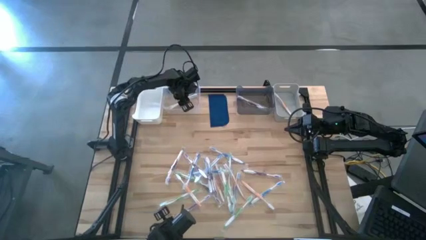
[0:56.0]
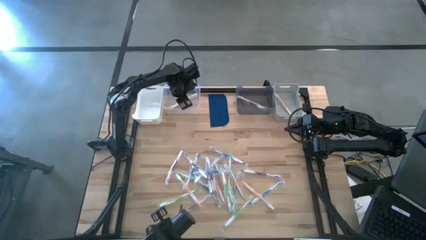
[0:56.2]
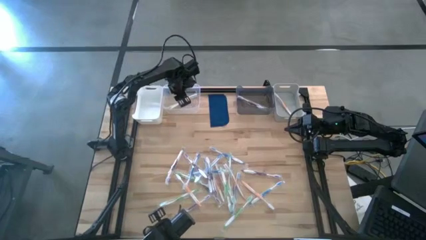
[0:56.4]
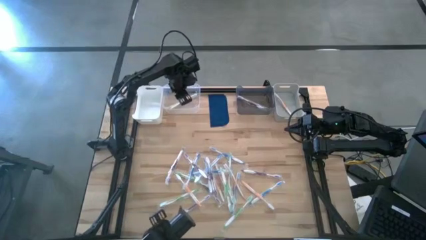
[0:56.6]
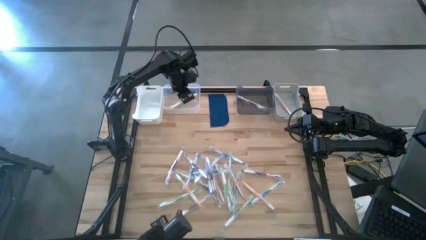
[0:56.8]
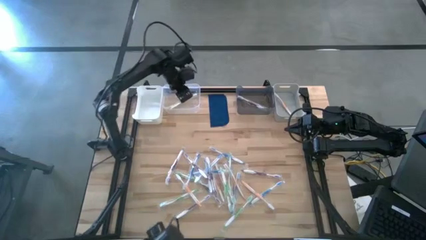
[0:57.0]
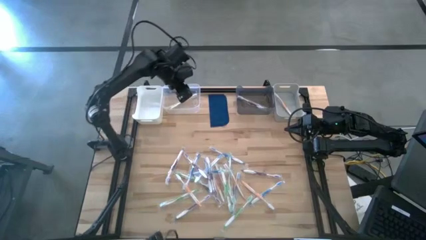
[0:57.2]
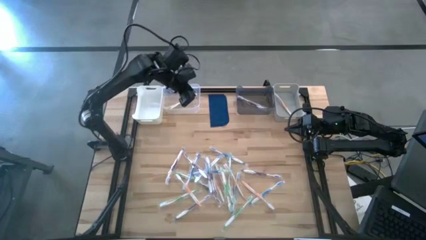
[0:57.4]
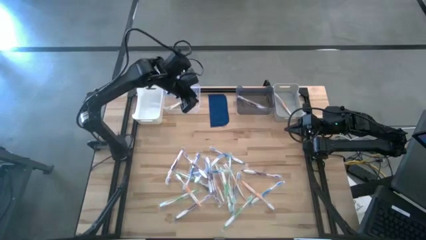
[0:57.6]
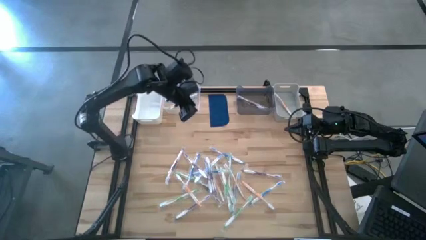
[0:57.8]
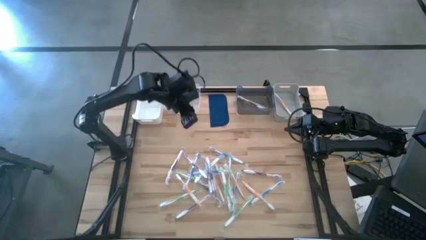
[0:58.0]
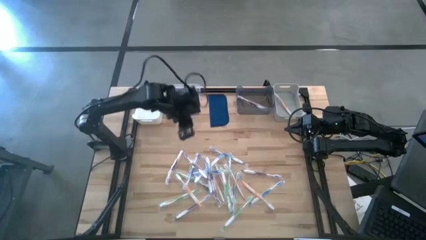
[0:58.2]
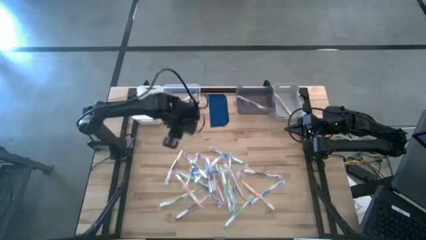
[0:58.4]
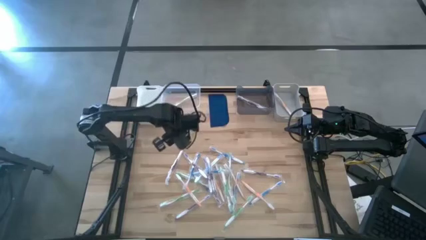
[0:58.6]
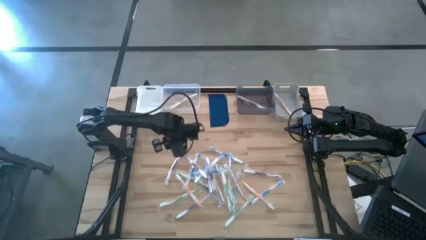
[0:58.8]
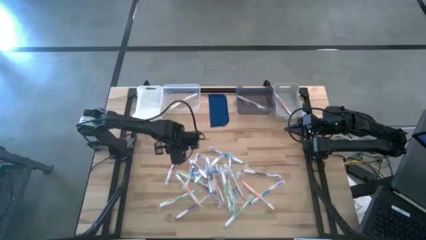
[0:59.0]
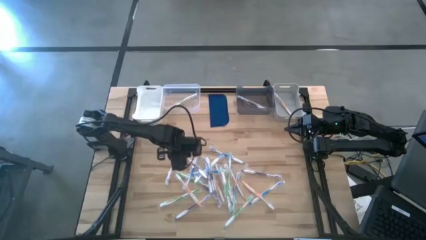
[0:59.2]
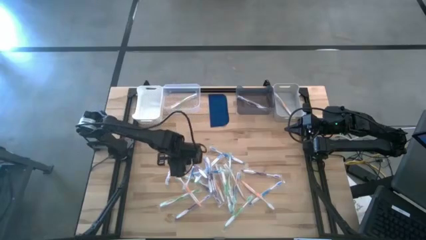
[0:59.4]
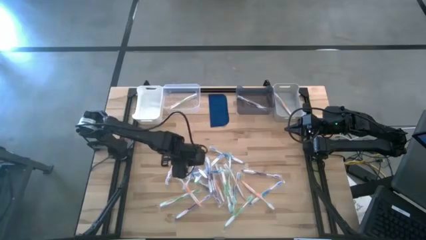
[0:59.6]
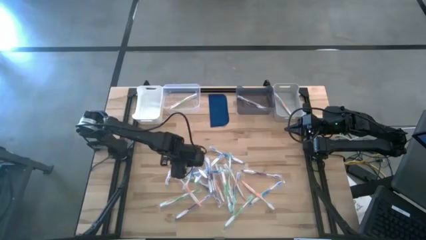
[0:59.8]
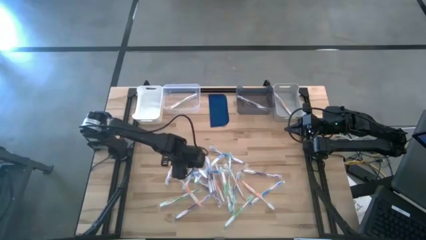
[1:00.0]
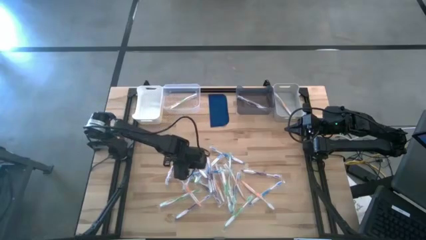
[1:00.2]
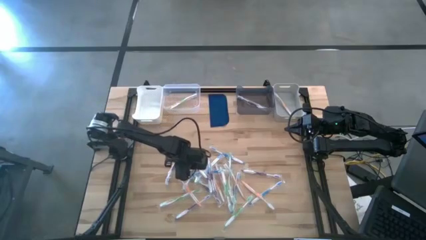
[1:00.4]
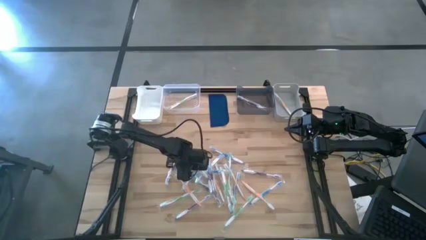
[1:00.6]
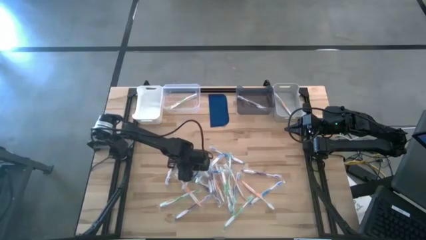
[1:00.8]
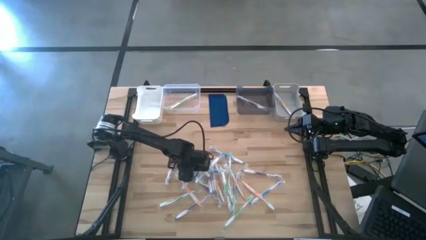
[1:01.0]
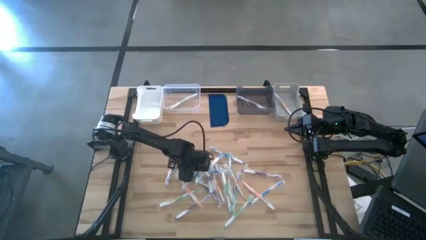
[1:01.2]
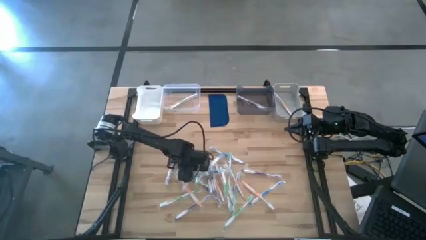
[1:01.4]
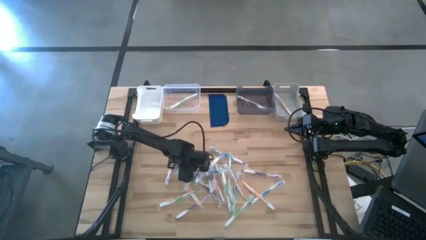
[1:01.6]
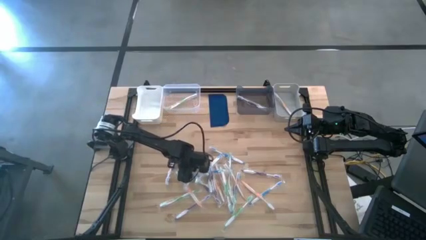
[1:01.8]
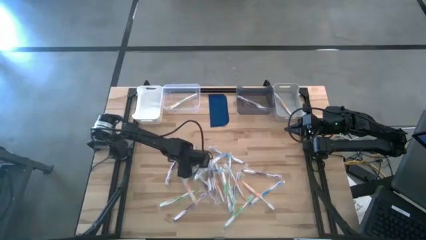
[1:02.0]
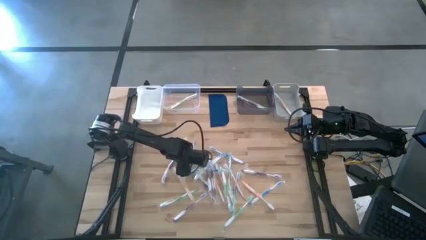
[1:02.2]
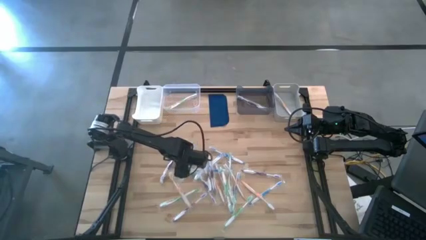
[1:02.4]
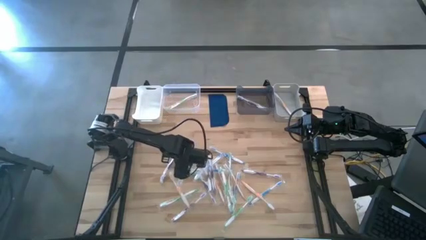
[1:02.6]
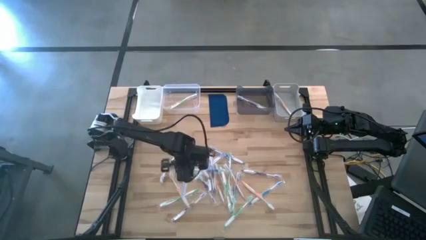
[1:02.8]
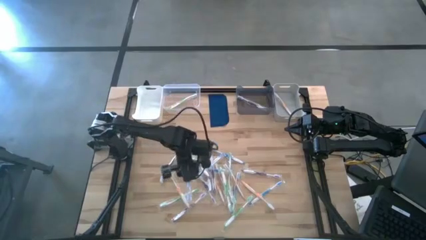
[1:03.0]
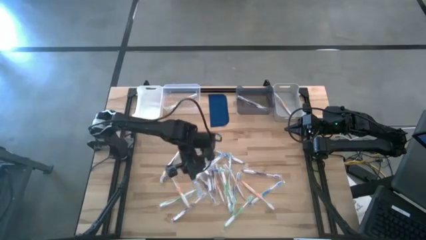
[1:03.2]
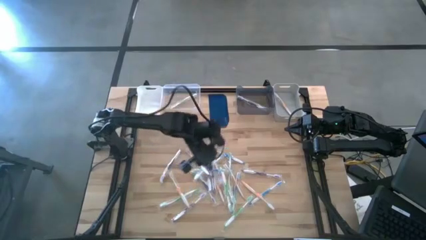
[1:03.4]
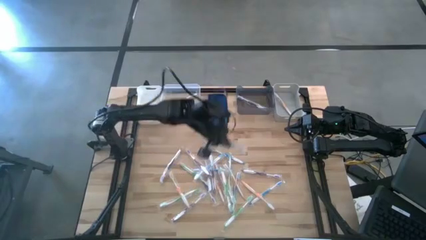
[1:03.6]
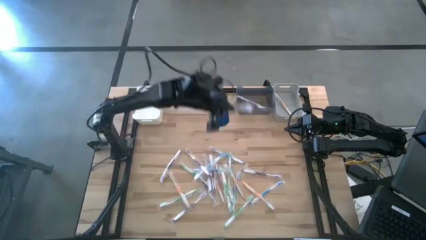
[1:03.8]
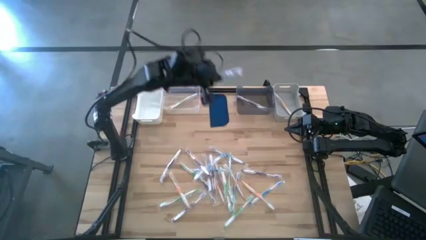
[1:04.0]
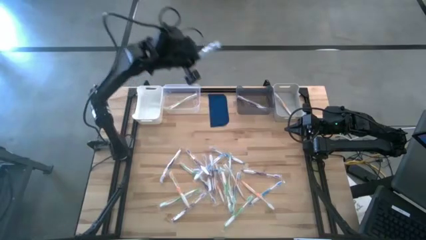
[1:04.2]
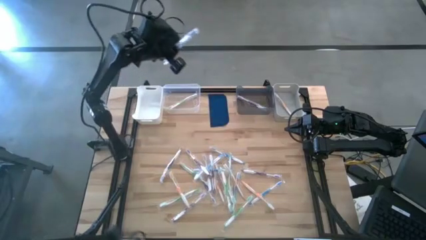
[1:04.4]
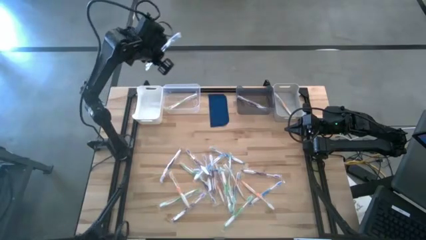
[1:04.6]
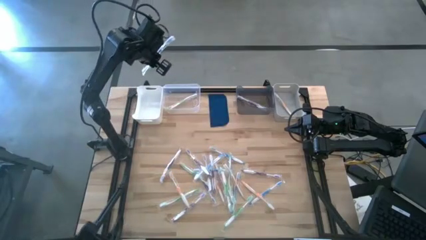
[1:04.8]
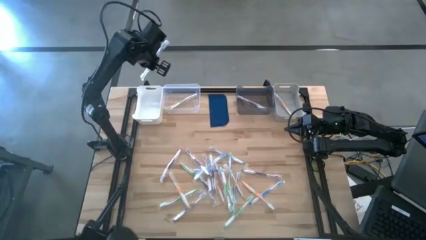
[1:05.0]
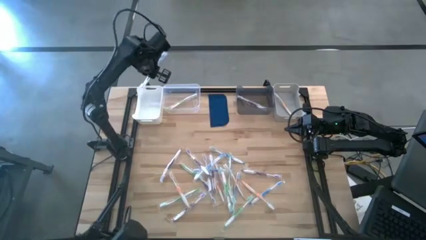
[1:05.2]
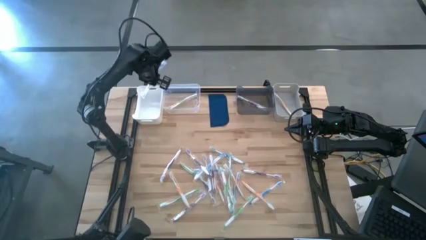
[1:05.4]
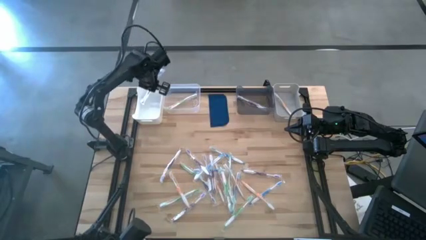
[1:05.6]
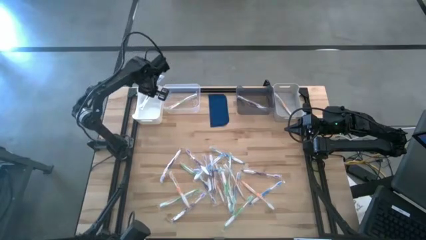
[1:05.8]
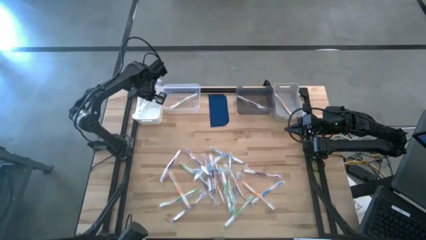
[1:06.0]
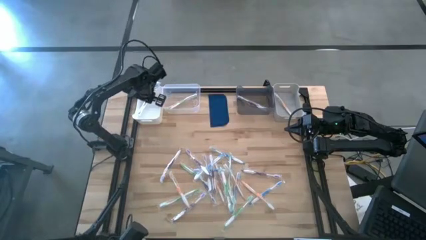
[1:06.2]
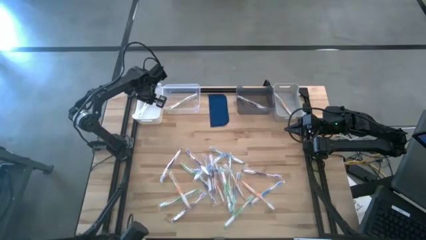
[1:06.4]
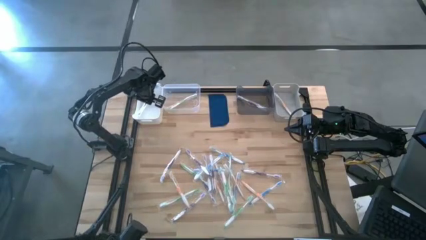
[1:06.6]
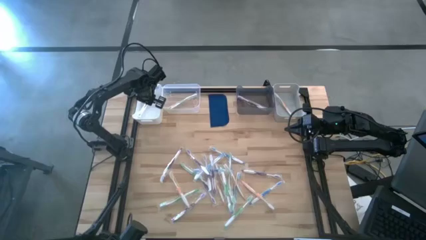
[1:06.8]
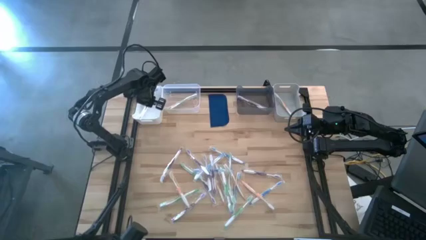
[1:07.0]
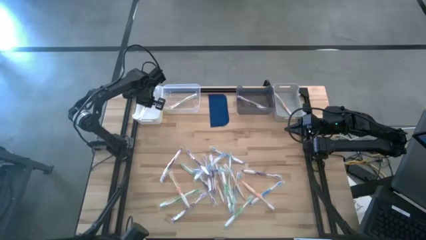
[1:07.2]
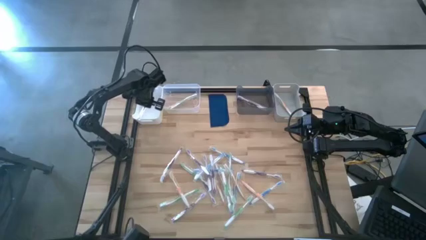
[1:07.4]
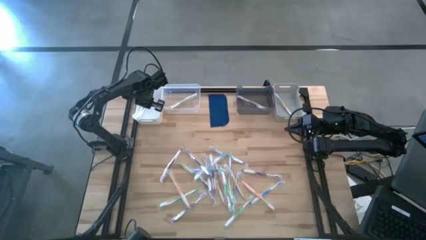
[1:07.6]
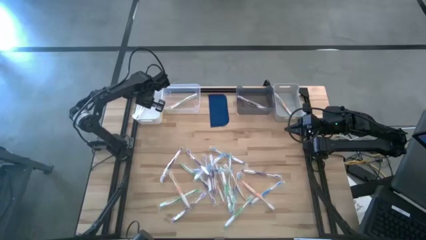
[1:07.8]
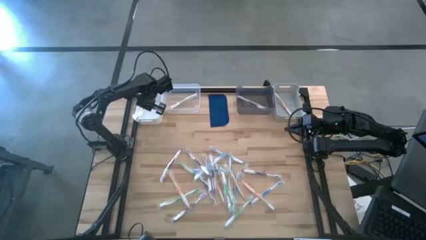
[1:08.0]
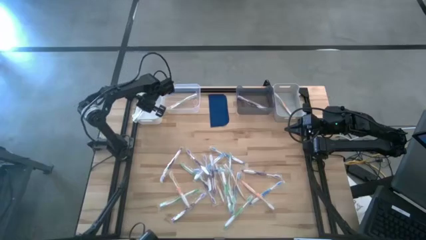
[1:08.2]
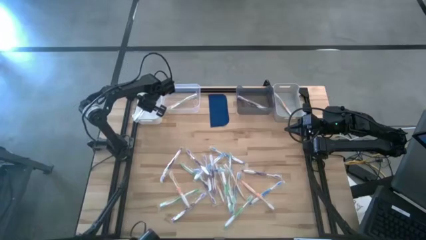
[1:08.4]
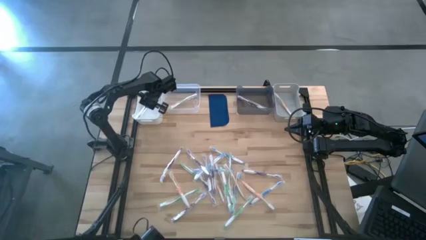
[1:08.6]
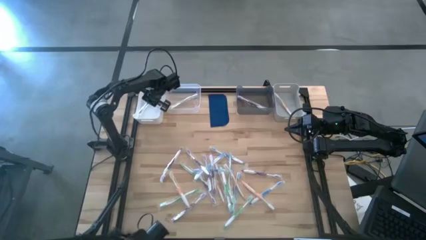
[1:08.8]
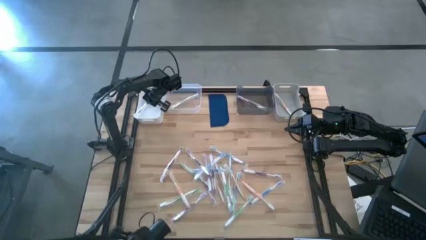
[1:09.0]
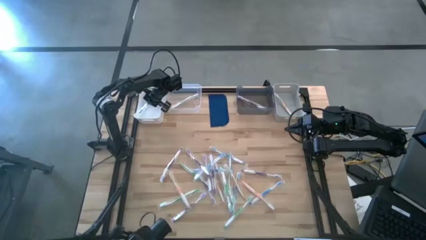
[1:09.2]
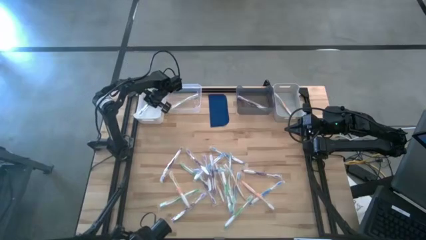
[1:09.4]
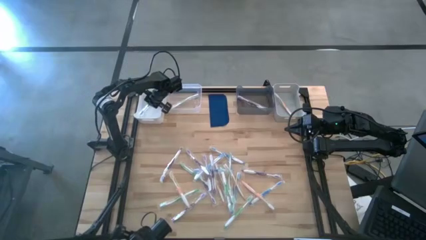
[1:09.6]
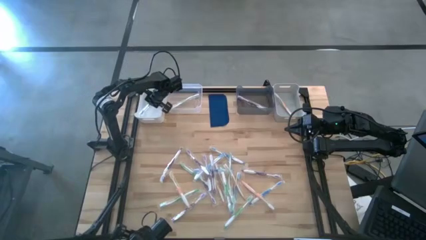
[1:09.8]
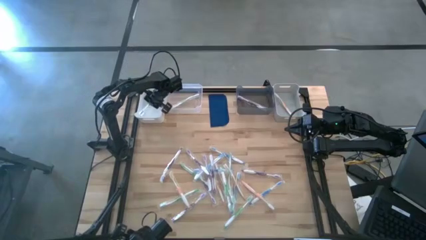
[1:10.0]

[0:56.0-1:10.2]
Task: Pick & Place Toothbrushes
Put the blue toothbrush into the white bin

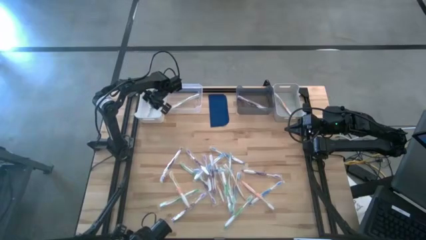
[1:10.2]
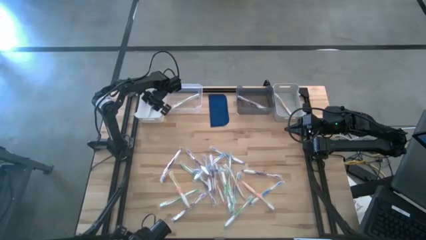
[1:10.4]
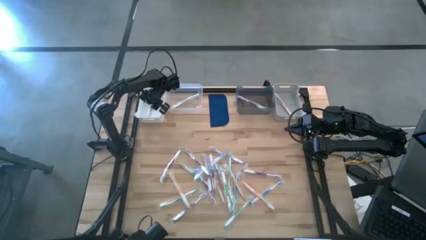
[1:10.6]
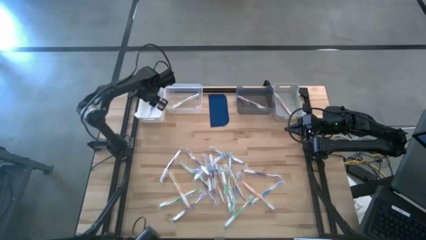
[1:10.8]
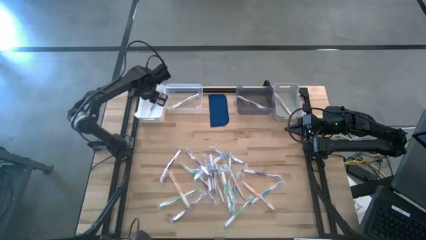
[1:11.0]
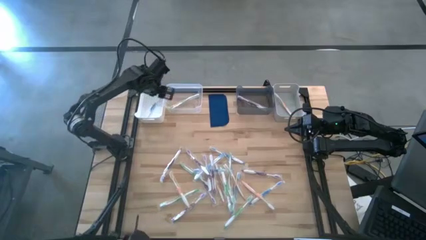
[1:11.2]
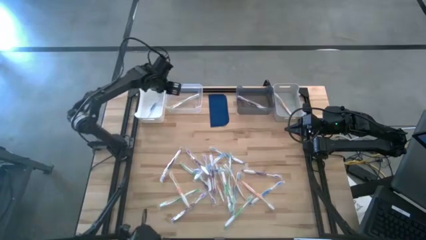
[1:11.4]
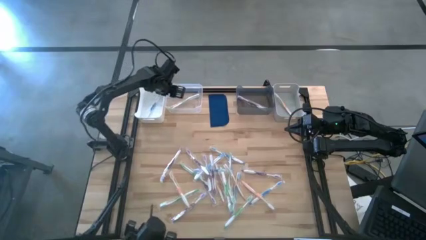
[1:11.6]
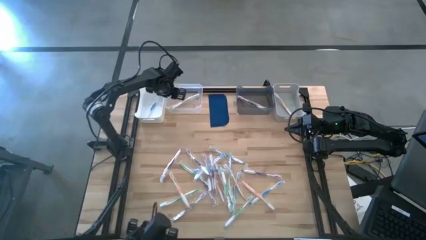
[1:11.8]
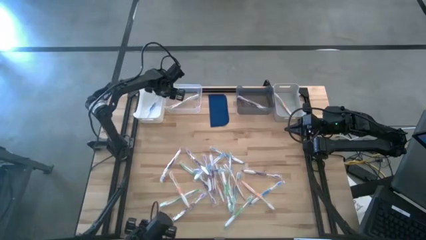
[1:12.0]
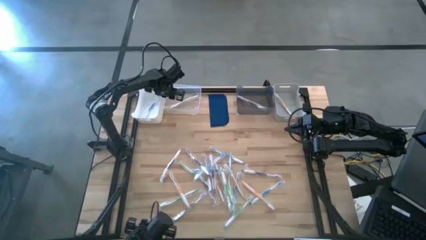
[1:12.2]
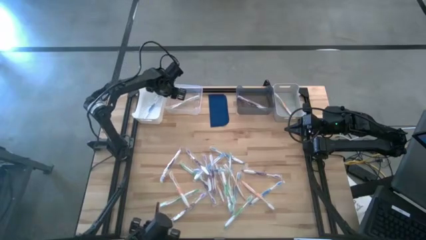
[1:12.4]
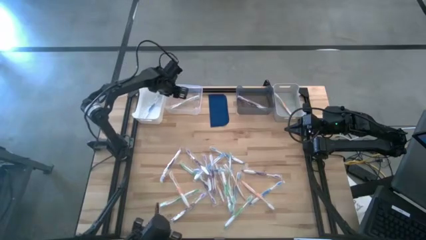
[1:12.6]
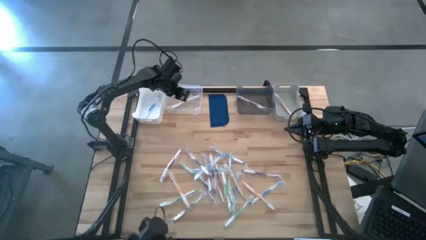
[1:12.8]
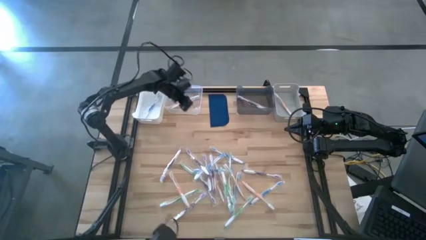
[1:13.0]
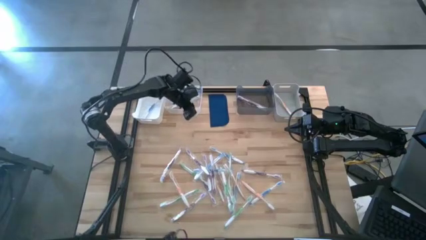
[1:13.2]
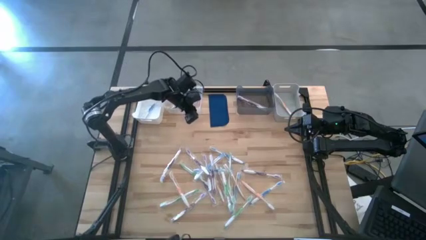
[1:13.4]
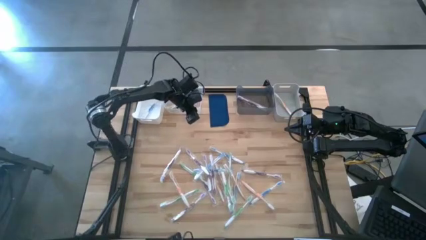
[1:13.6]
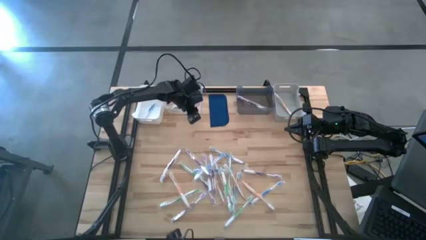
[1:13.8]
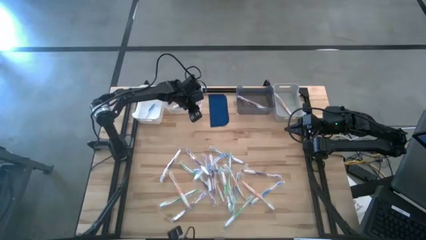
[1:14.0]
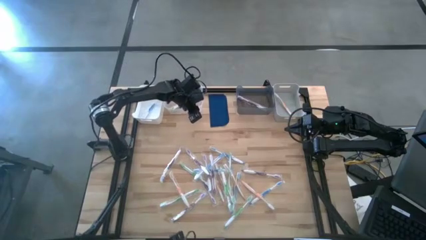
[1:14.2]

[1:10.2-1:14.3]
Adjust the transparent bin on the table
